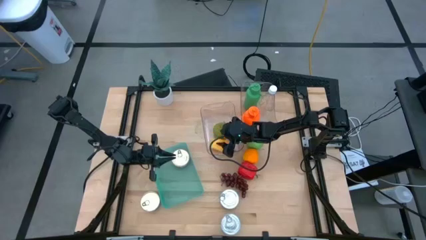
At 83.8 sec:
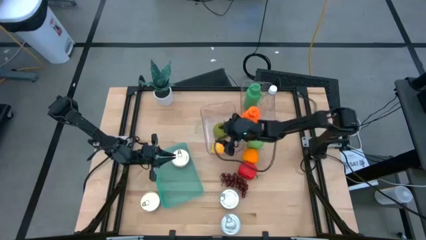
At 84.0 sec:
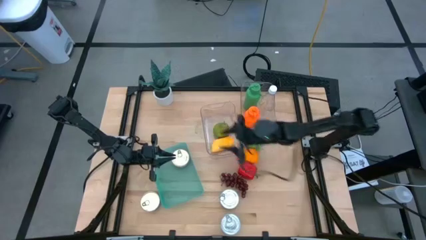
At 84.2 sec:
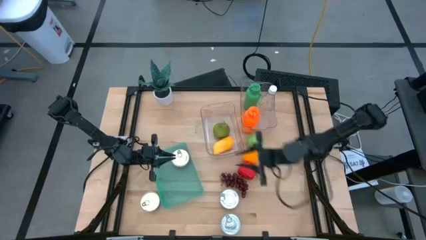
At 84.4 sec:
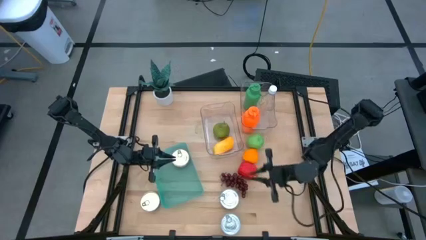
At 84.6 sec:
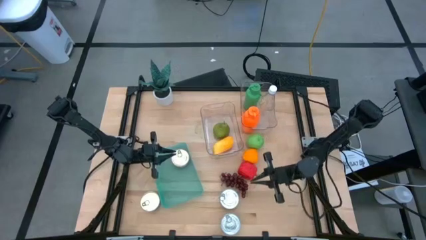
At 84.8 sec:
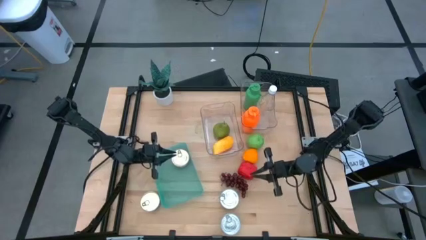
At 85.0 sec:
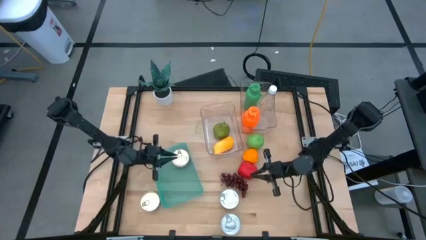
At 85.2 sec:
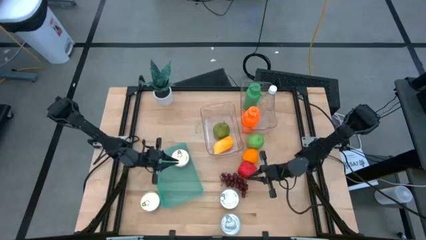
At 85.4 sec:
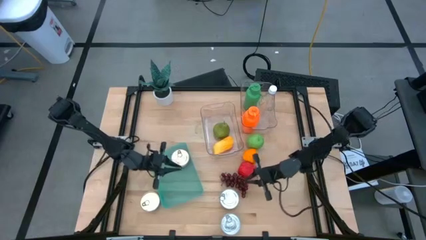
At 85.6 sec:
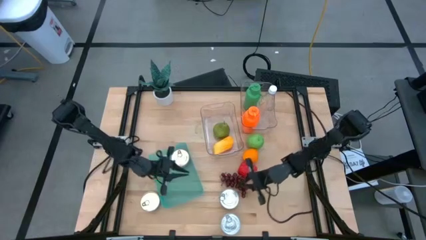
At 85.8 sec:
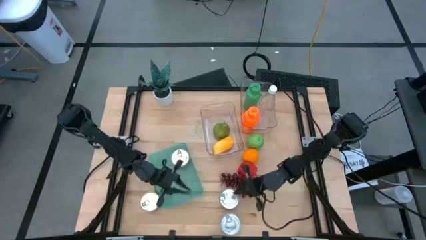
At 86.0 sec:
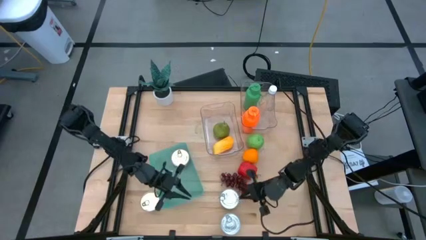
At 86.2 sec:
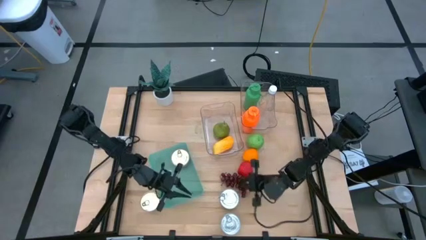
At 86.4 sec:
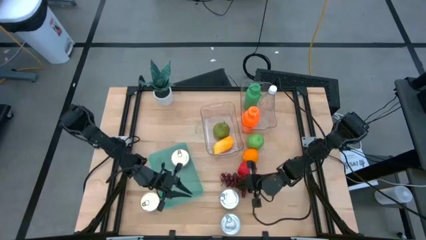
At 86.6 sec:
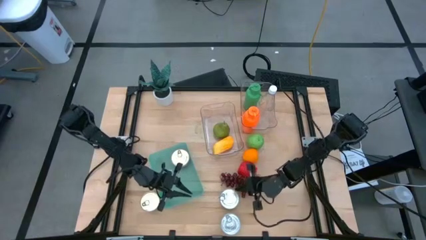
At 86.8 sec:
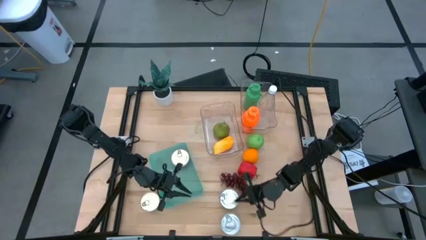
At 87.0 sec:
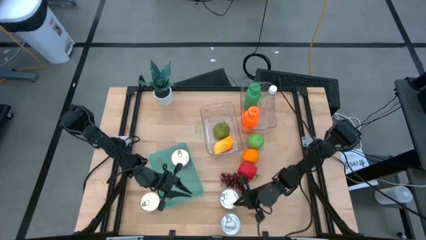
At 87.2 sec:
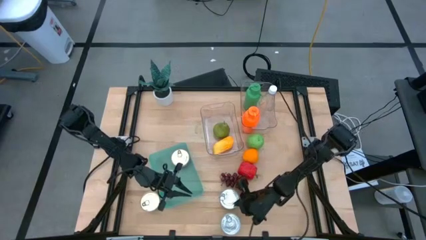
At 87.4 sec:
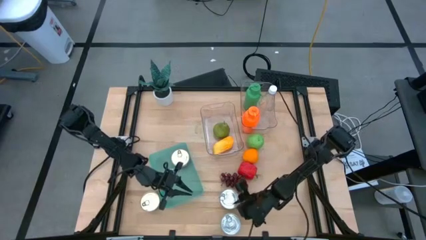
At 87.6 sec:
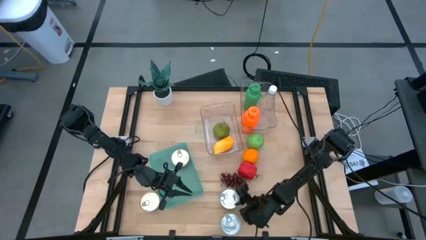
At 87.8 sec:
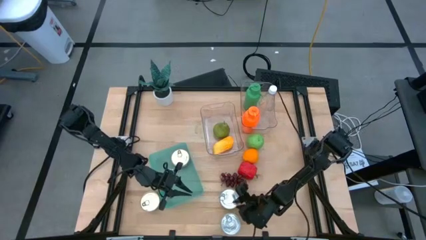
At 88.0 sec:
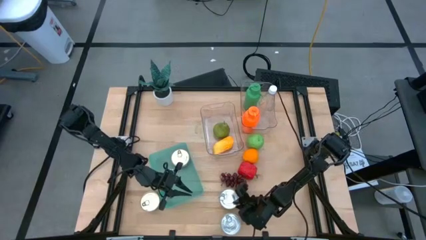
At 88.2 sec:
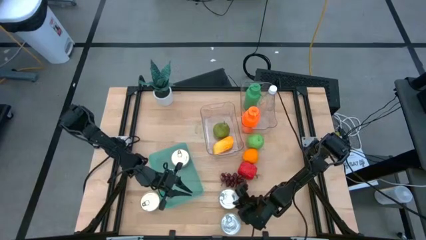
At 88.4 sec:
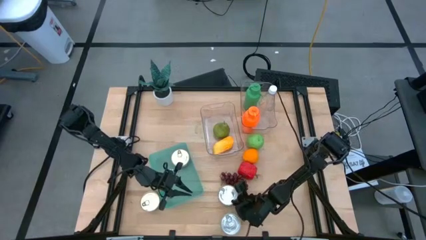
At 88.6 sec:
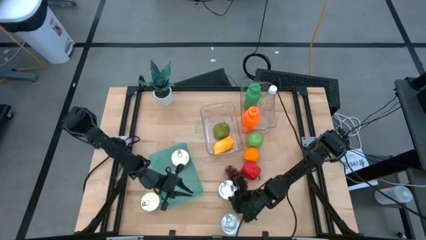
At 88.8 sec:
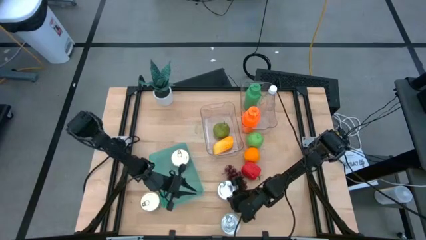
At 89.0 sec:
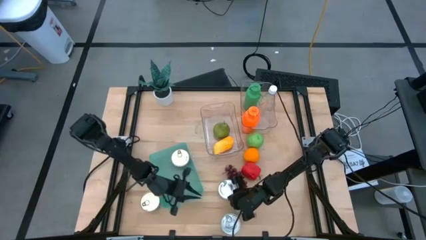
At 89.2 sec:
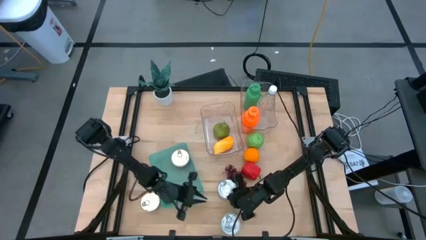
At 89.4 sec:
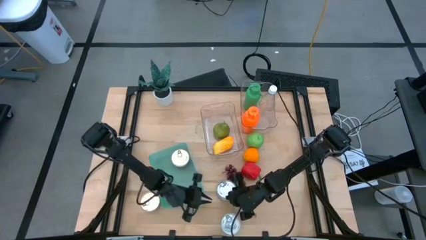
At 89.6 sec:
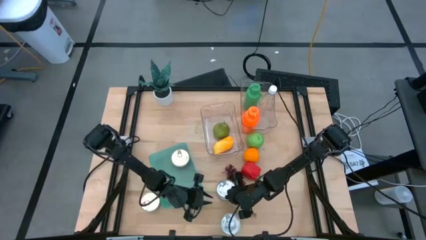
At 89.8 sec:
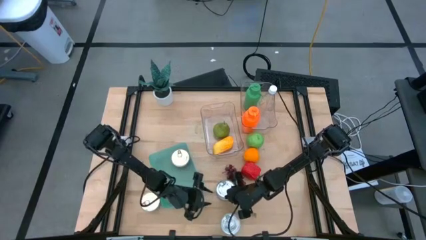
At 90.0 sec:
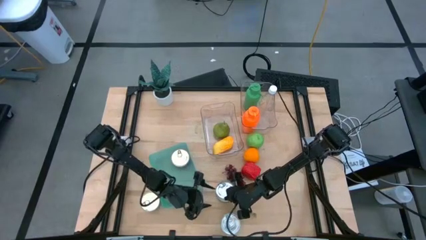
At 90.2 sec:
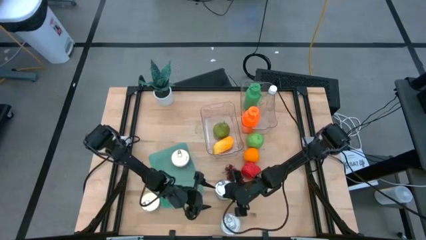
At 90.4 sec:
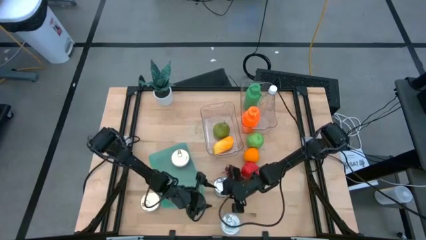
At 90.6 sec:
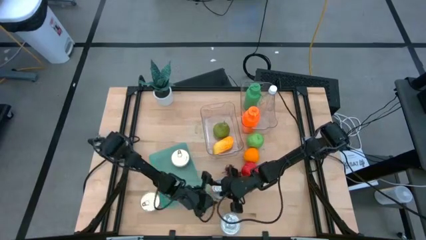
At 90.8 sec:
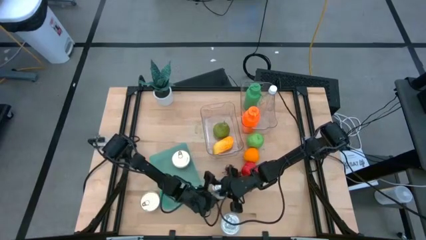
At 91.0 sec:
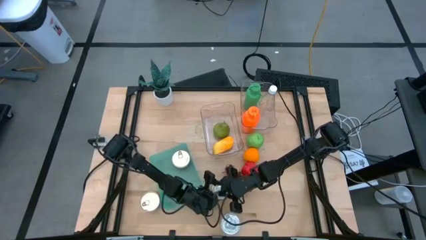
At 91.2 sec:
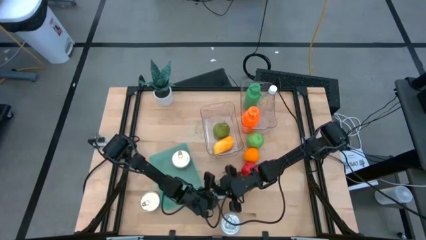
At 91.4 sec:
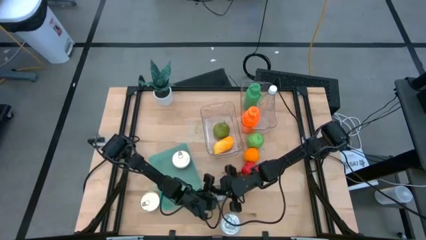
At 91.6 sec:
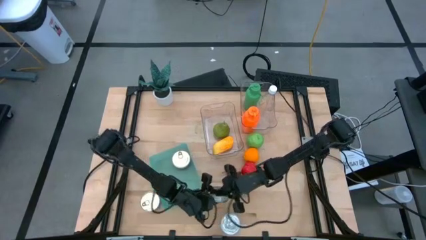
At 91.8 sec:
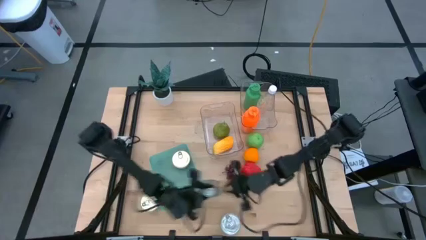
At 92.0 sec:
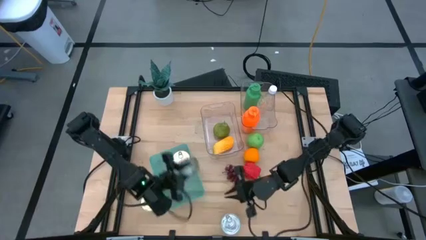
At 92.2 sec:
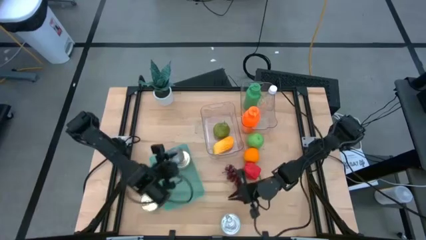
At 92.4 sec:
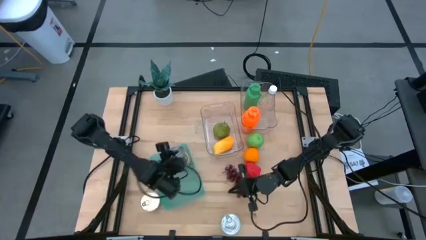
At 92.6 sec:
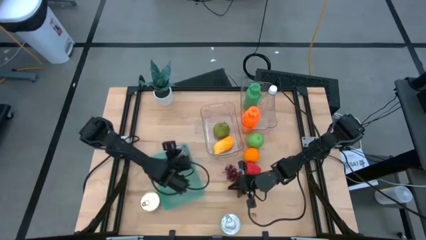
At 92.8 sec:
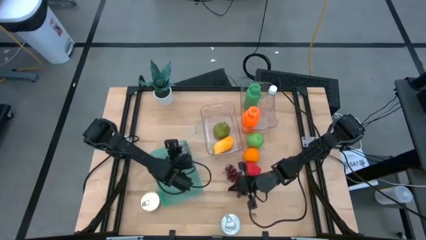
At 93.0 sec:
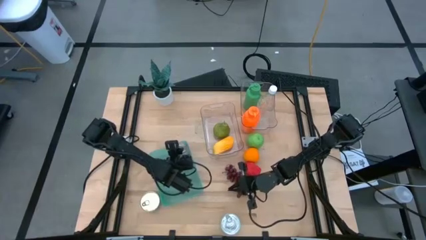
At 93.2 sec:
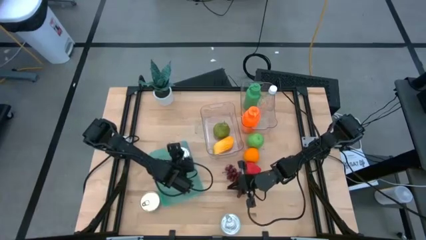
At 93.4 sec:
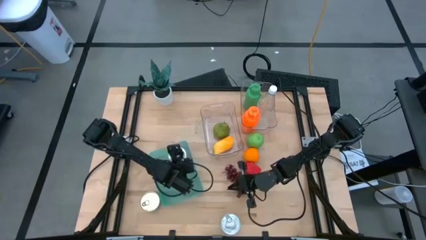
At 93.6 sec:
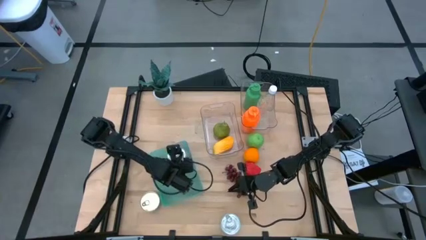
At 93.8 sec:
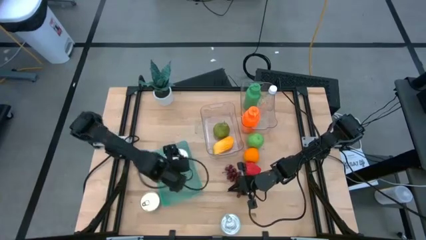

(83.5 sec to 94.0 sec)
Task: Pick & Place Food Item
Put the top green tuna can into the green bin

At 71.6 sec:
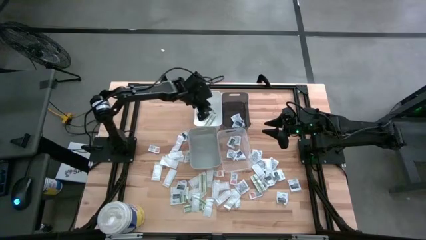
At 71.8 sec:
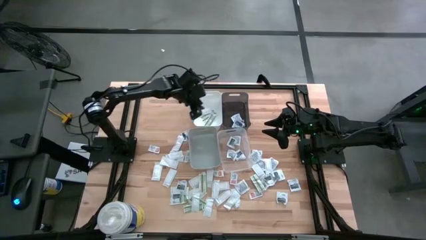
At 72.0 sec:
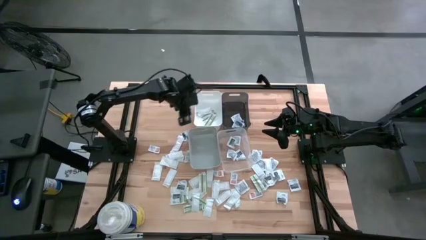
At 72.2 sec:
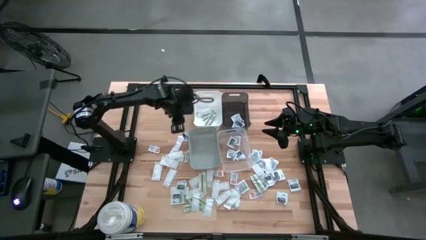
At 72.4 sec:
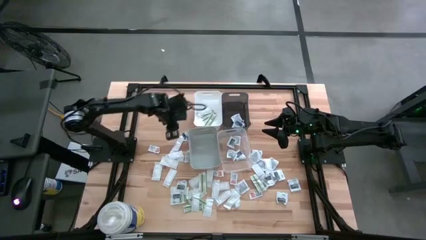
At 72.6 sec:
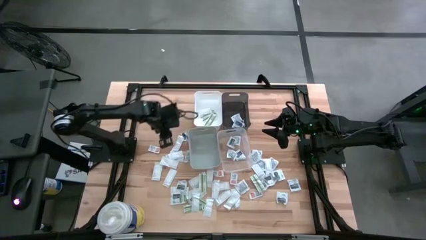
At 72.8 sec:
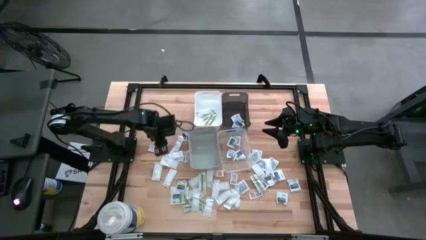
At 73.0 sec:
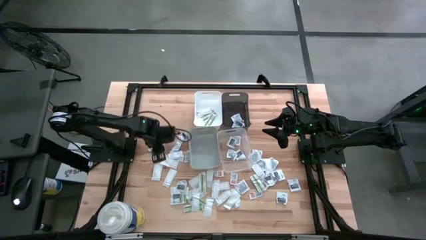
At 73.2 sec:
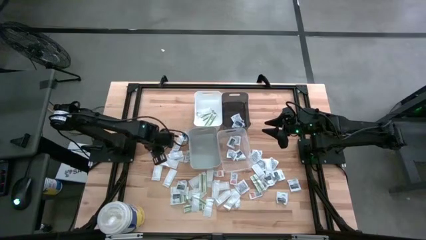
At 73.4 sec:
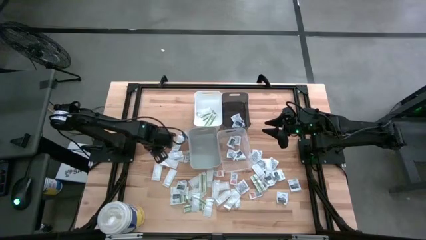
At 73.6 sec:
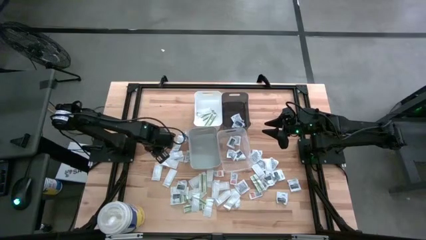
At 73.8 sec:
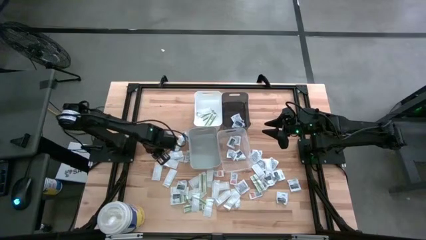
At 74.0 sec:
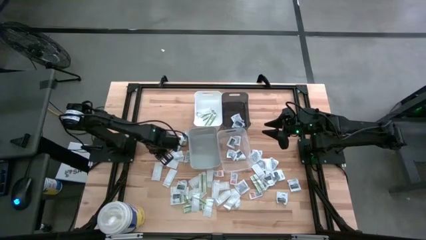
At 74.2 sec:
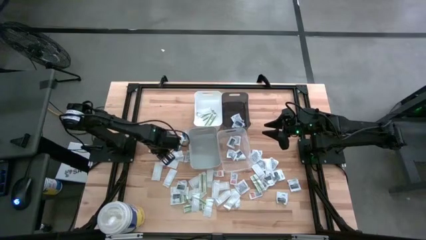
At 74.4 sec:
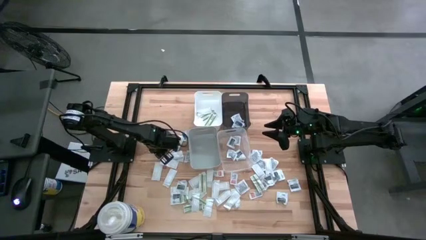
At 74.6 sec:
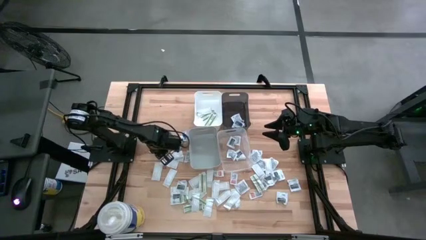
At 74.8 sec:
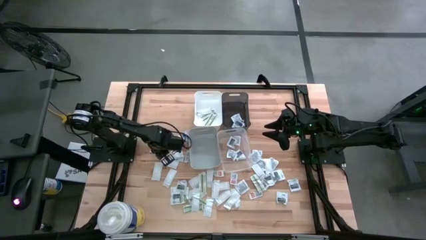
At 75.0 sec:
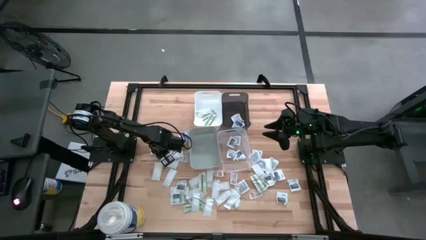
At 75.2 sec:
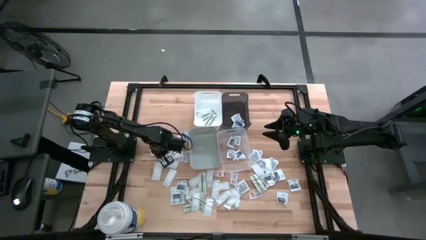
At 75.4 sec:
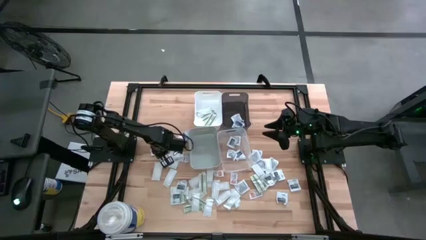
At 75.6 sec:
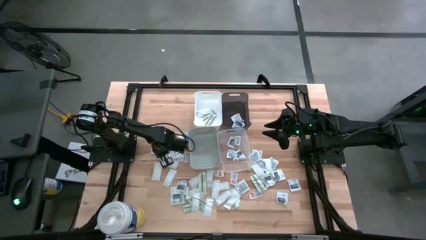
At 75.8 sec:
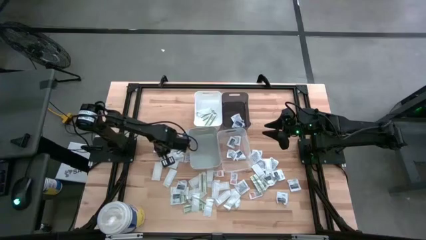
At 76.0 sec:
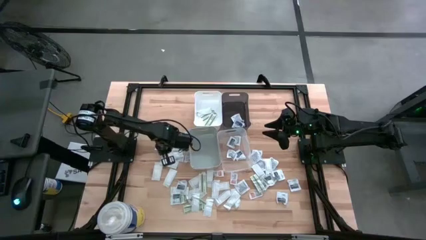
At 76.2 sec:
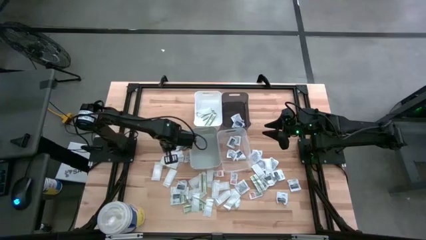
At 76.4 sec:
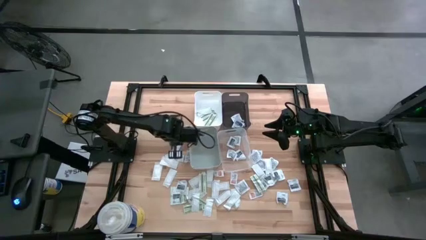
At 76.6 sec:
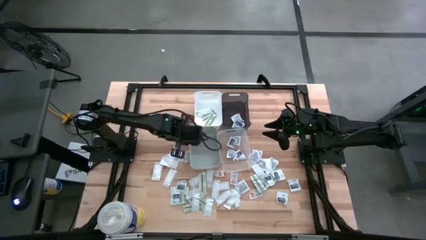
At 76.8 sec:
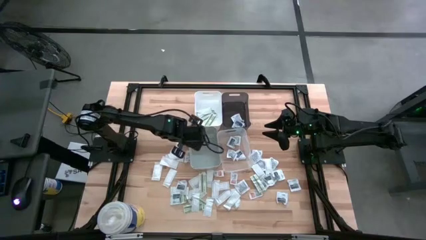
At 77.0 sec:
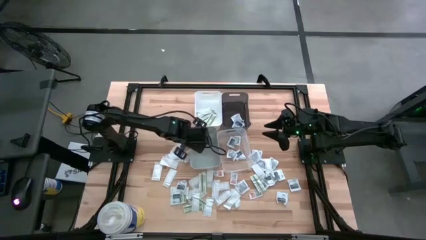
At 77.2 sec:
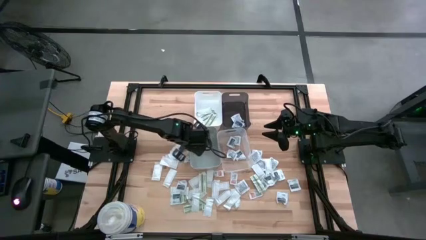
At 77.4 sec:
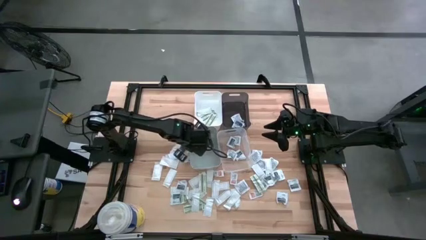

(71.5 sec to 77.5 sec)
Task: Pick & Place First Aid Supplies
Put the orange ointment pack into the gray bin
